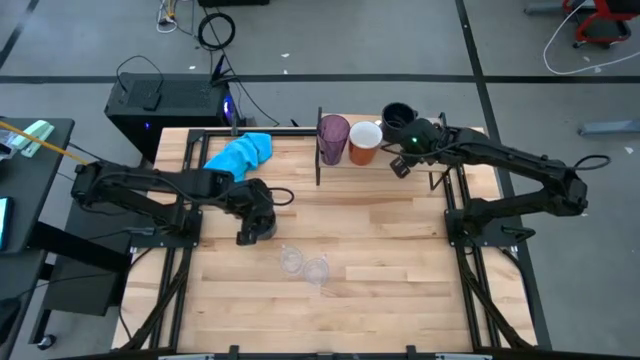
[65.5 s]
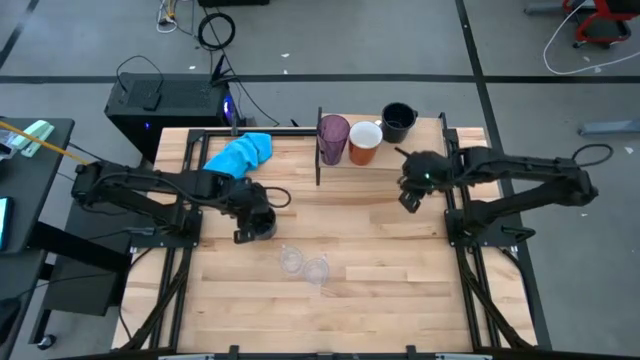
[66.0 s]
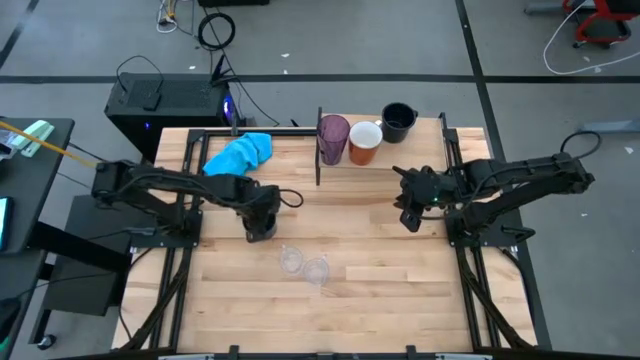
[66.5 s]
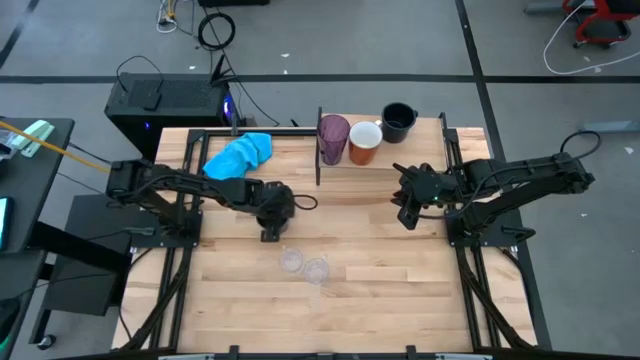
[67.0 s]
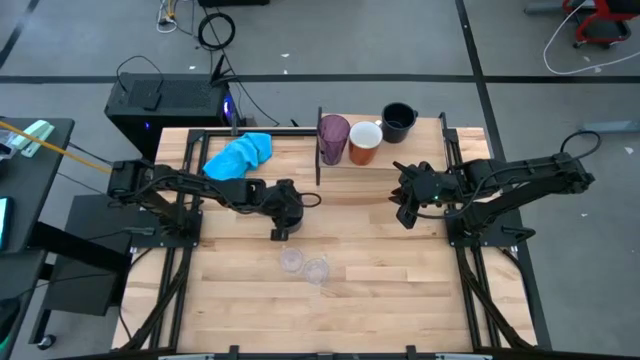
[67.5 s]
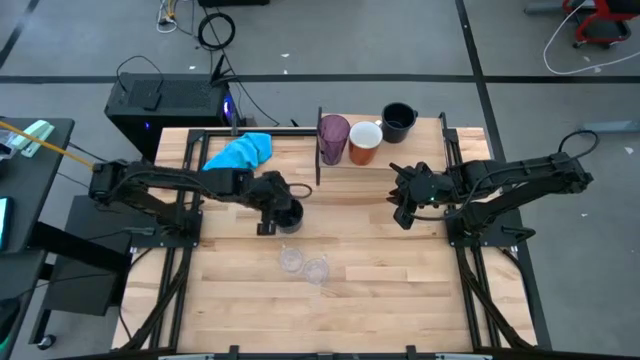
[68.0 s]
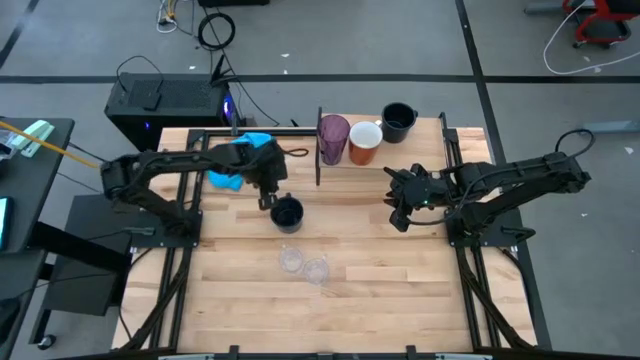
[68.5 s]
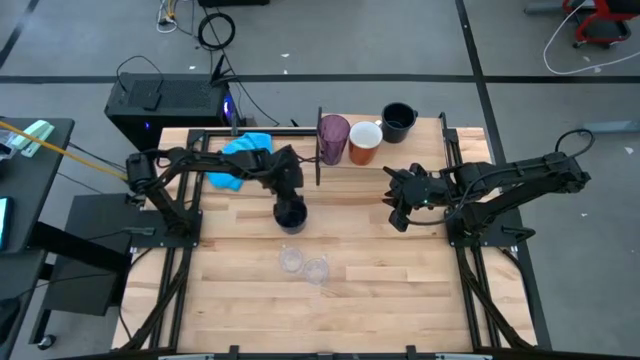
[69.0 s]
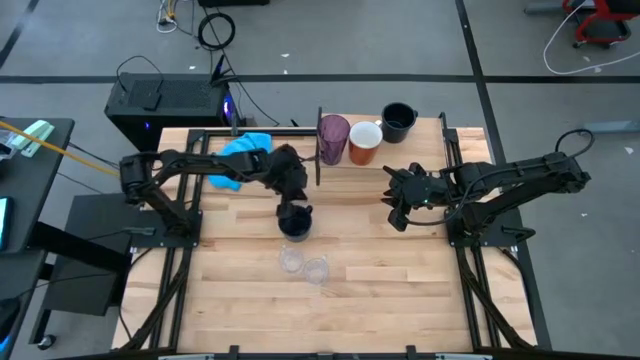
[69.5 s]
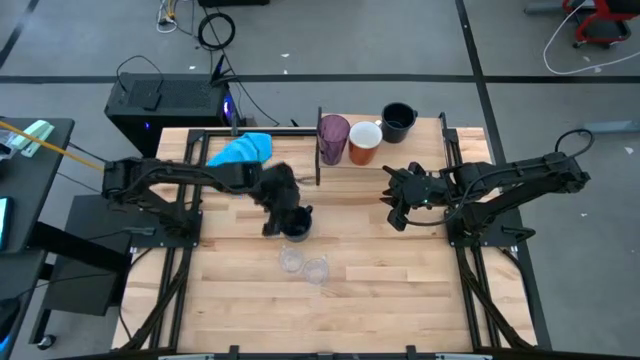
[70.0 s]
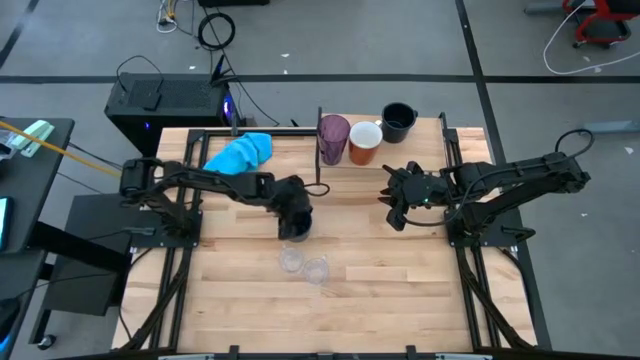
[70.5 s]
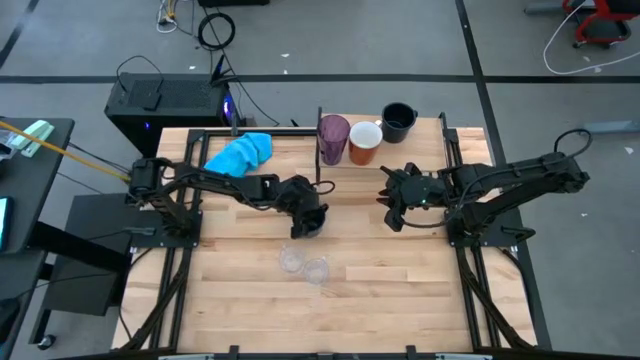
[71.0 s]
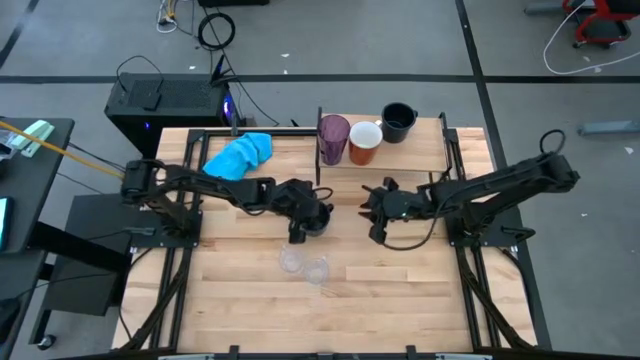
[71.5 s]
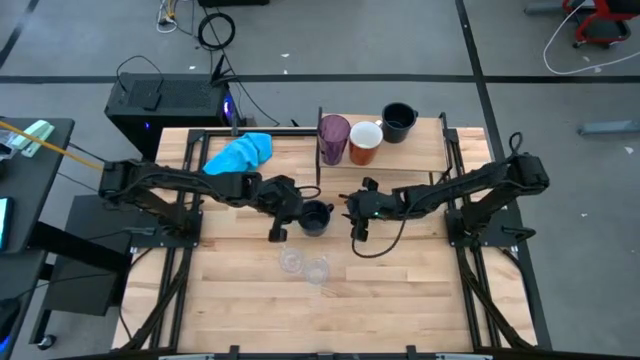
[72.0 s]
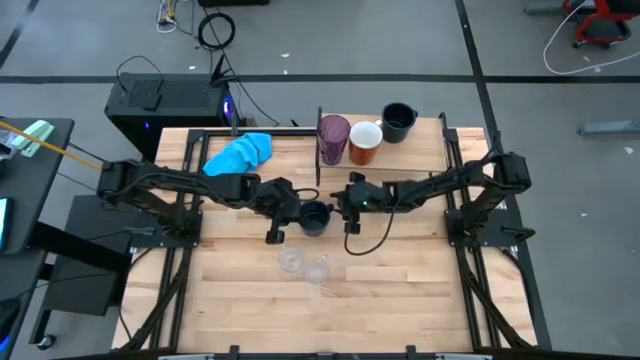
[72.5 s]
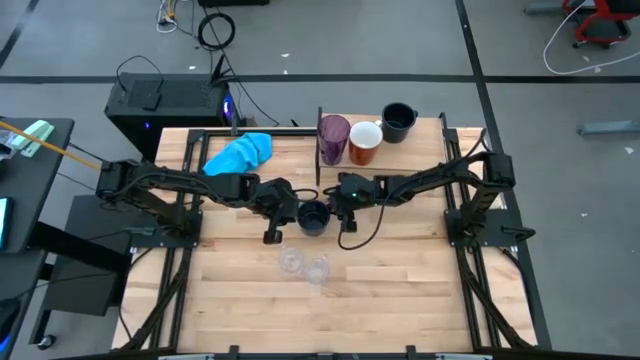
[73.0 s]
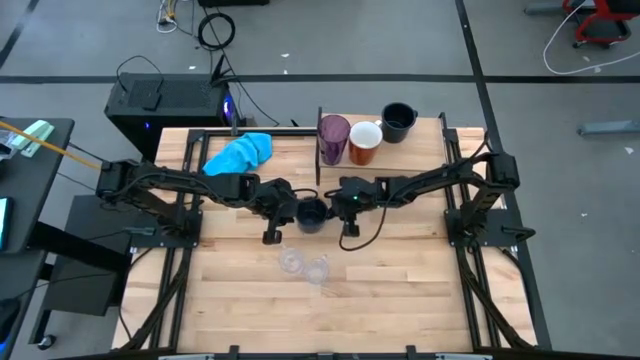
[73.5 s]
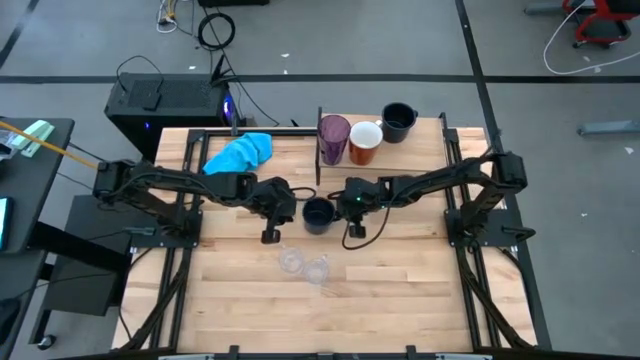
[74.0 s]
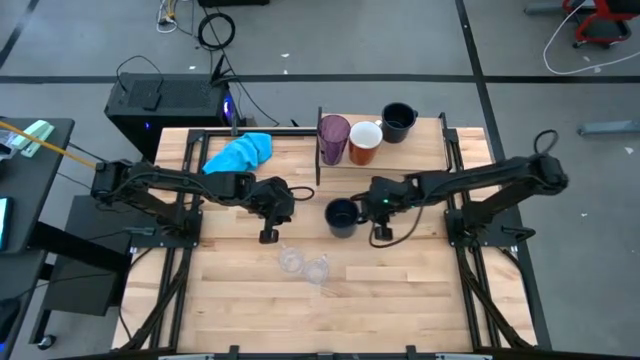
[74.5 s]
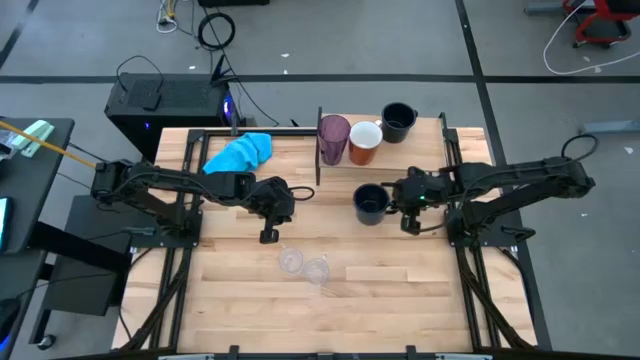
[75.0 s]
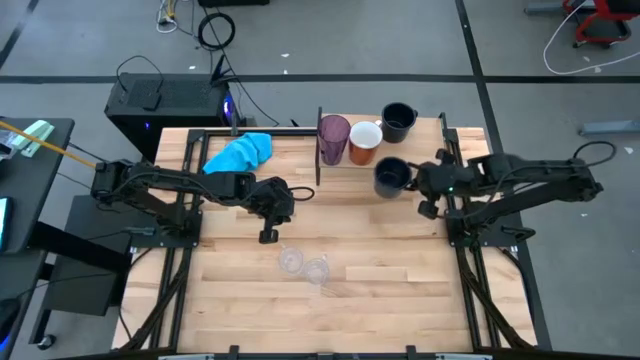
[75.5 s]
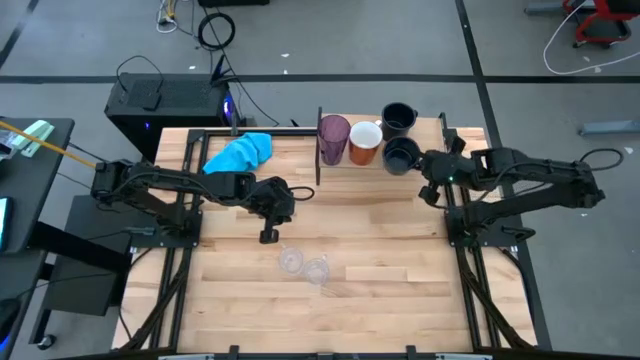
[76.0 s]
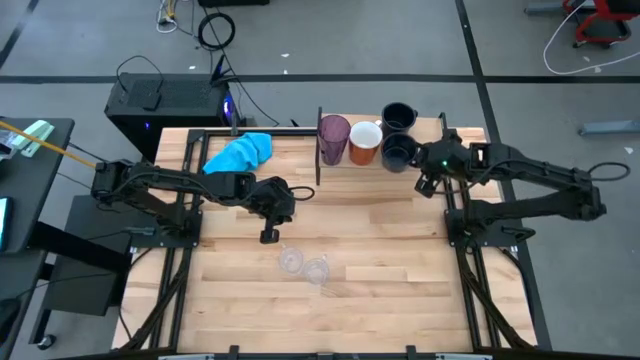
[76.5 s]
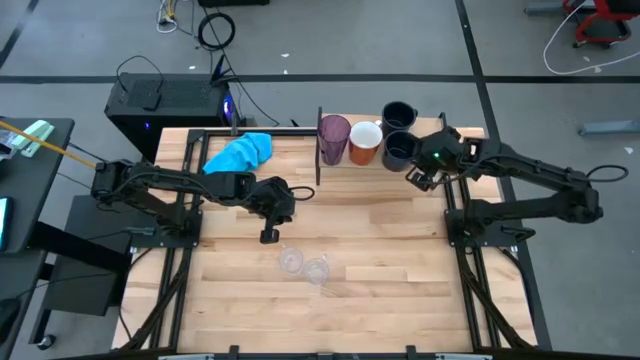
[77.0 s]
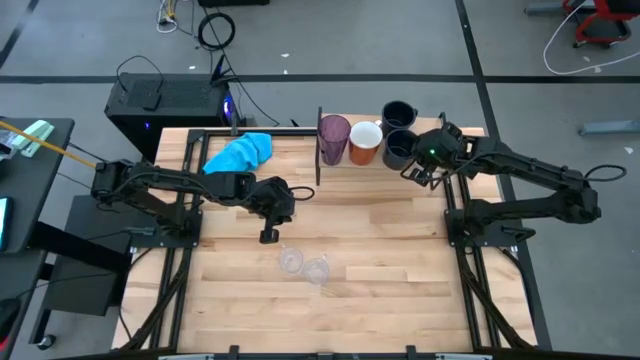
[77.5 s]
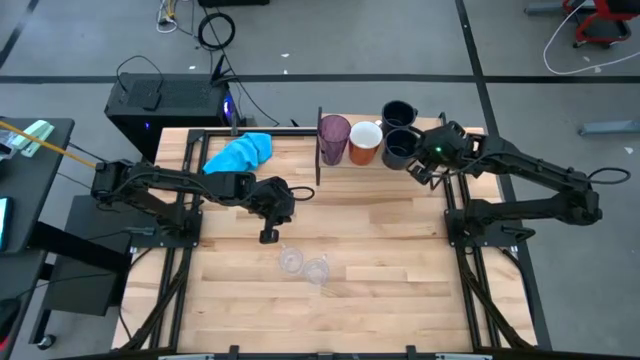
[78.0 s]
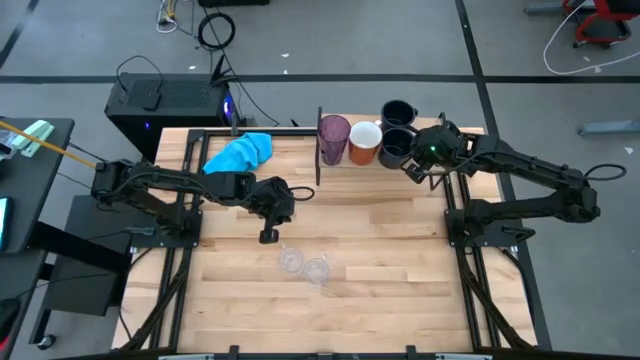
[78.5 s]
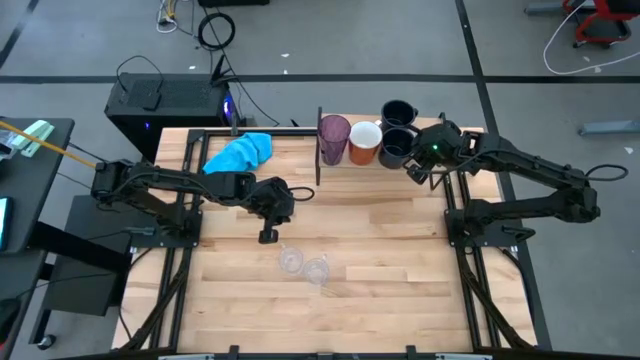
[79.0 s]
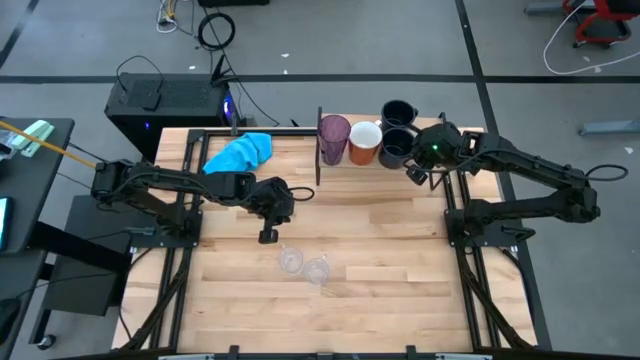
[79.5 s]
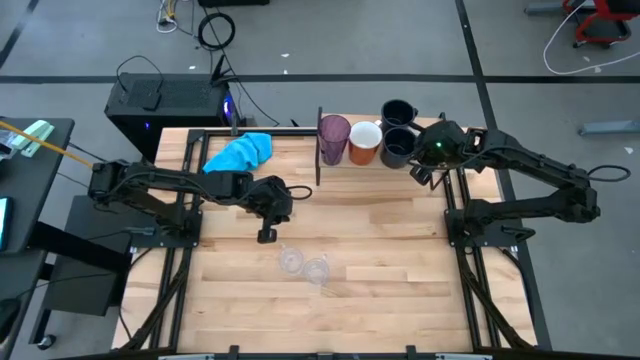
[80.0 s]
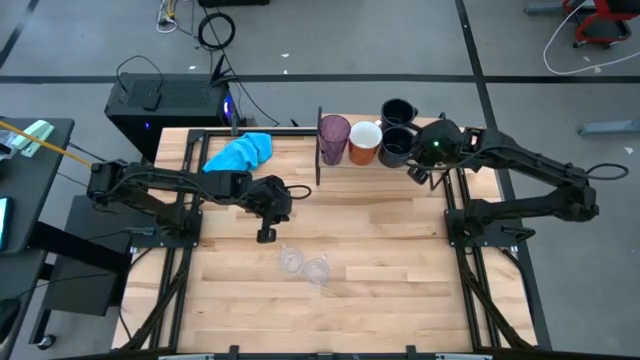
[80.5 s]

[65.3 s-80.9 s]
Task: Stack small to large cups/mugs on shelf
Put the black mug on the shelf

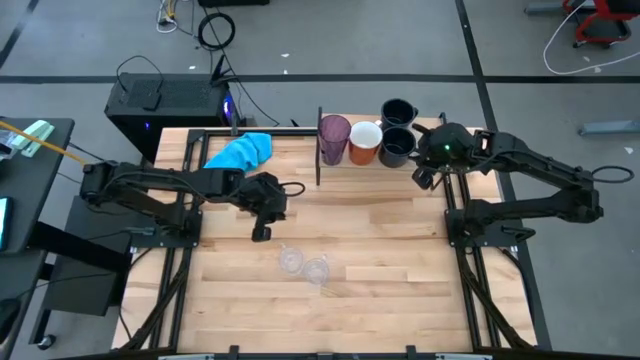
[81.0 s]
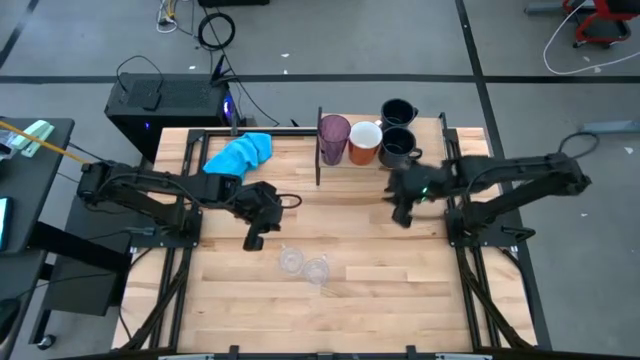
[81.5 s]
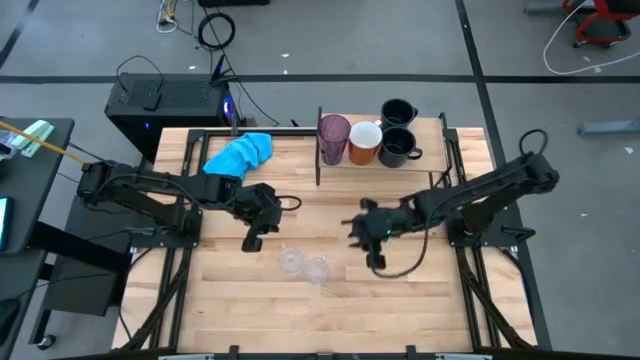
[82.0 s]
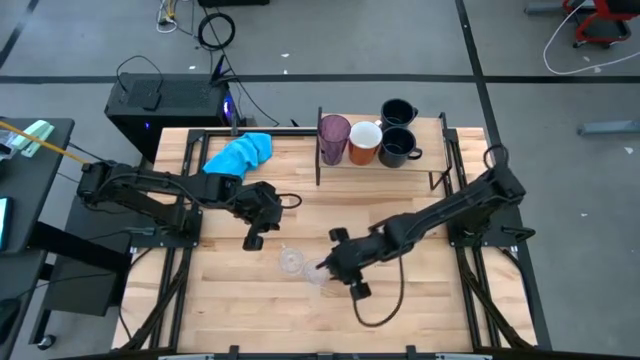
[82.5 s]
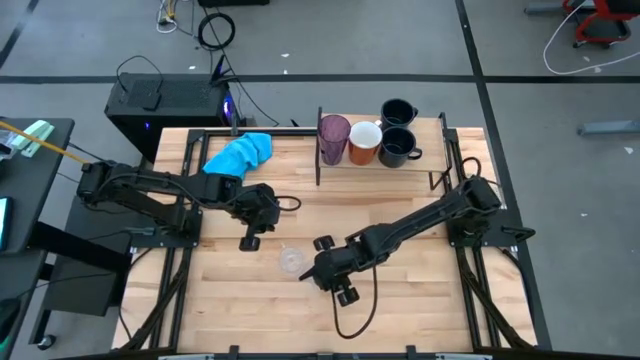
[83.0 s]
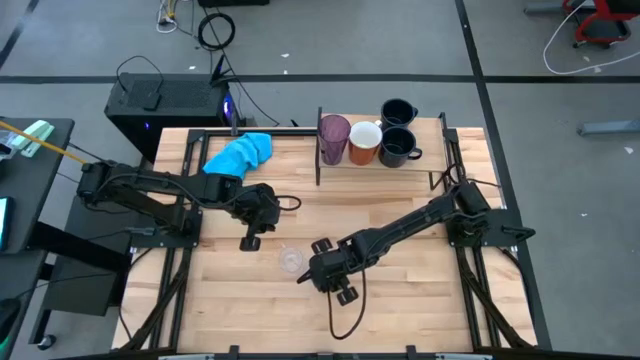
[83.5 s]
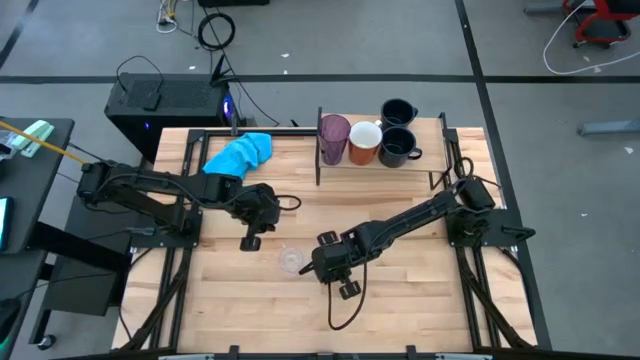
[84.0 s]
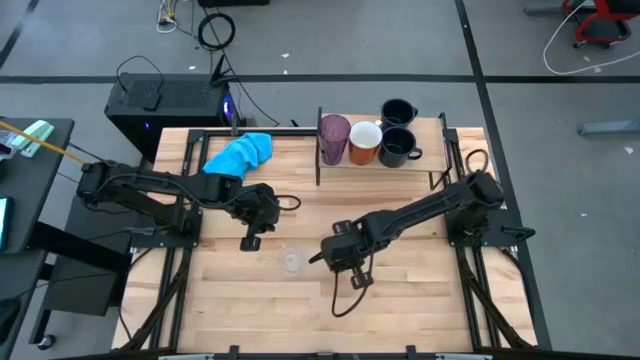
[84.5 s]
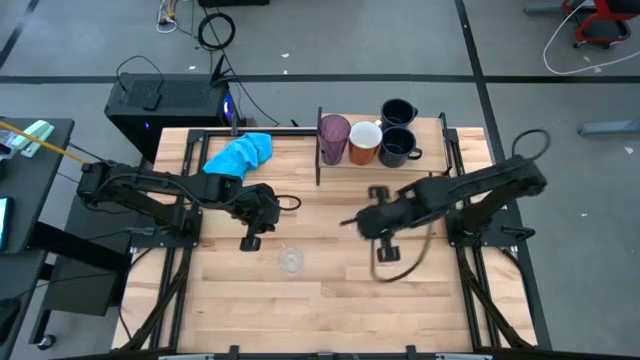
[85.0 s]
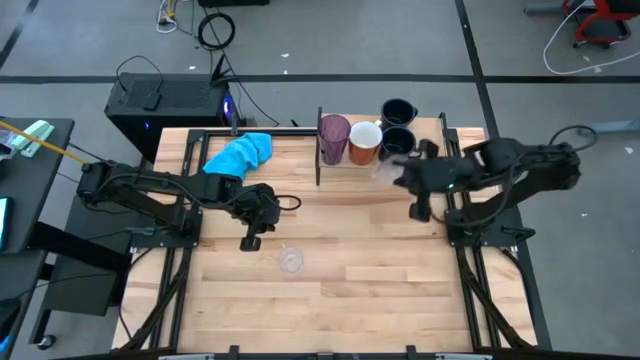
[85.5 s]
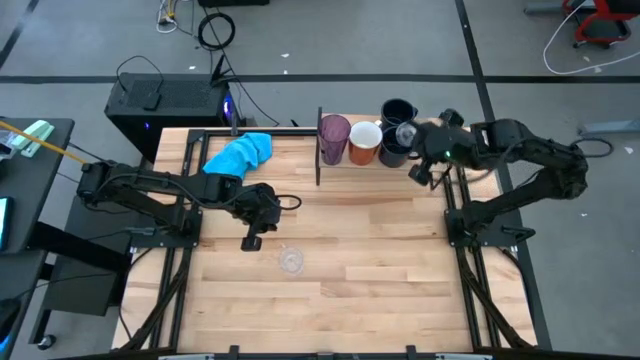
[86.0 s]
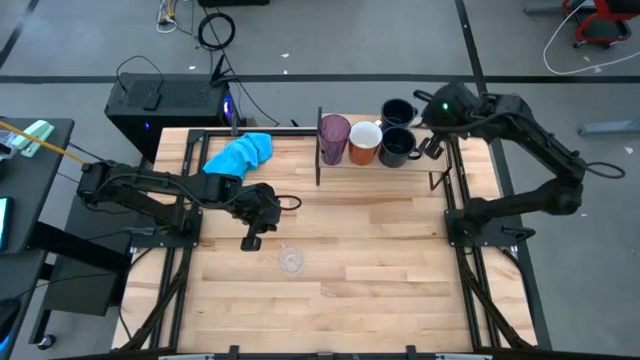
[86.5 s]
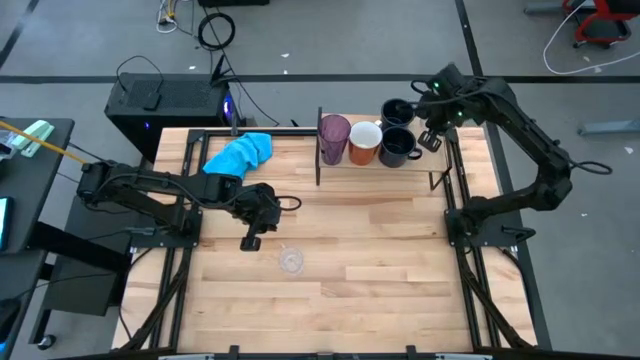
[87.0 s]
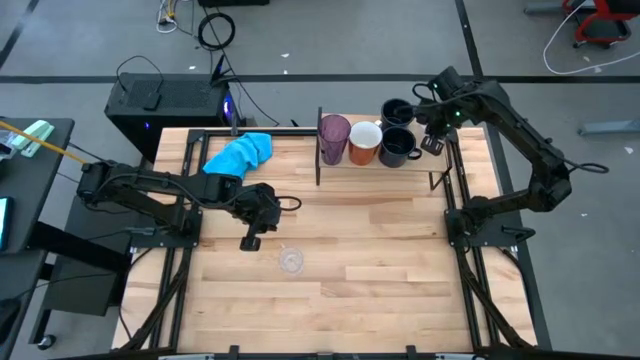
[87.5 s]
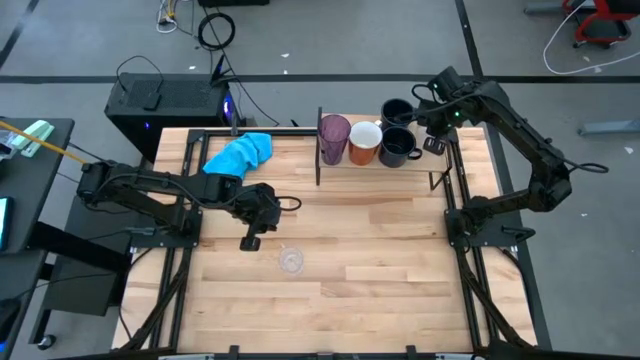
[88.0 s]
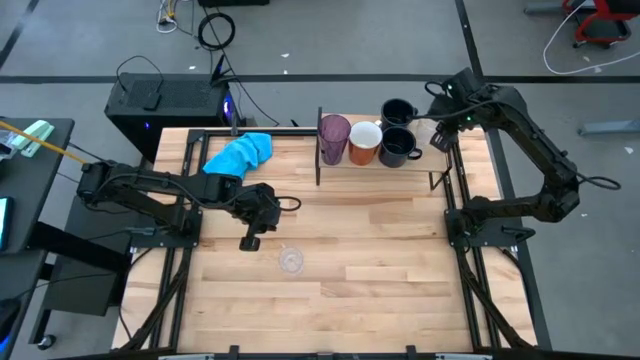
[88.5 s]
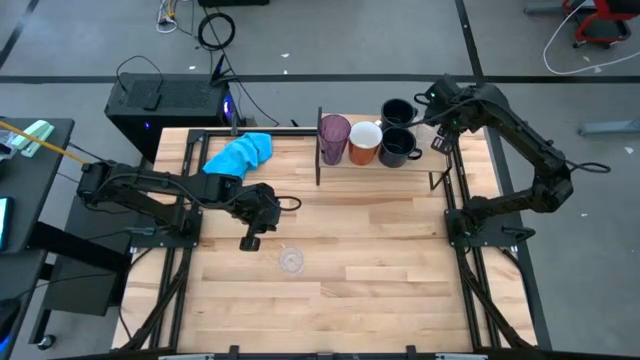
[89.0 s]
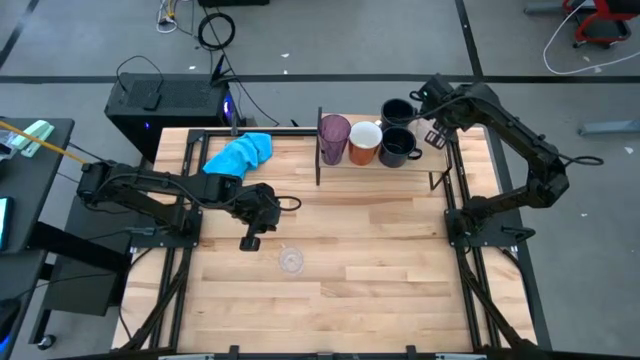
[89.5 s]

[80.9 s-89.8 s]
Put the right transparent mug on the shelf
